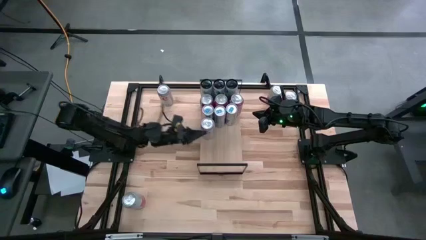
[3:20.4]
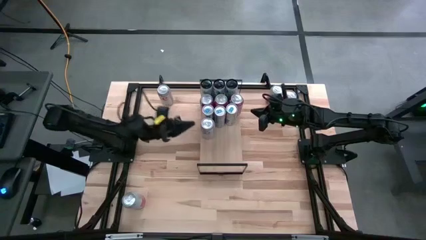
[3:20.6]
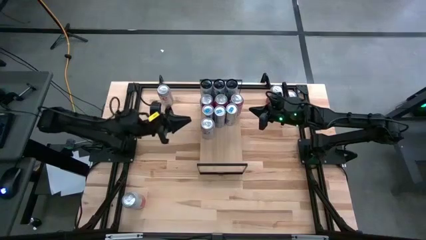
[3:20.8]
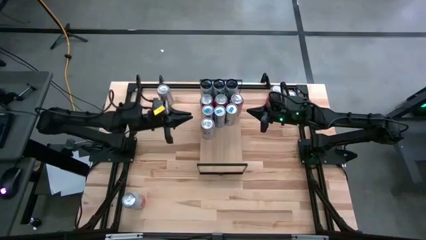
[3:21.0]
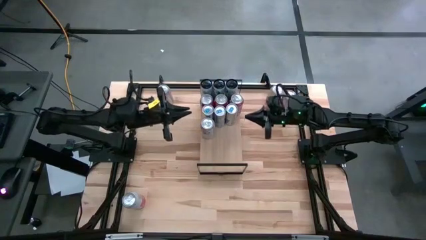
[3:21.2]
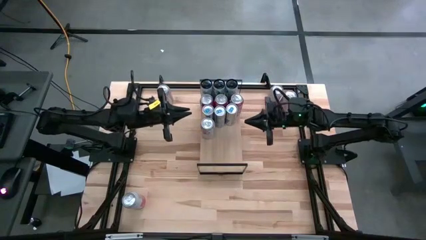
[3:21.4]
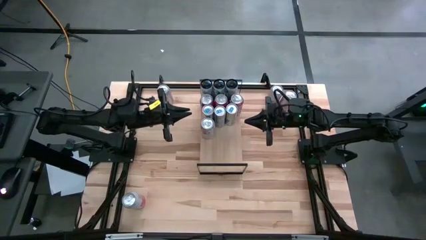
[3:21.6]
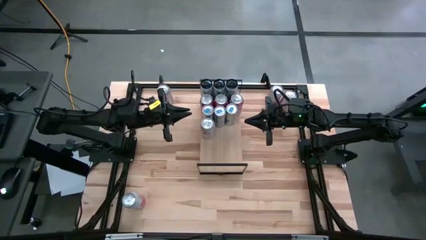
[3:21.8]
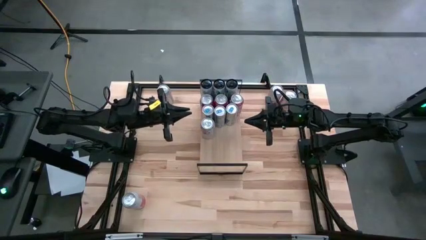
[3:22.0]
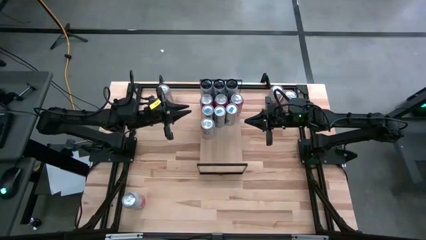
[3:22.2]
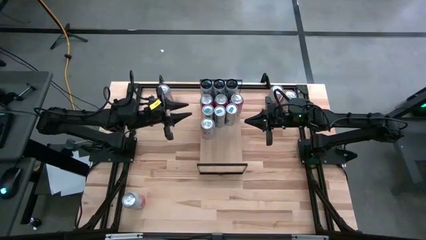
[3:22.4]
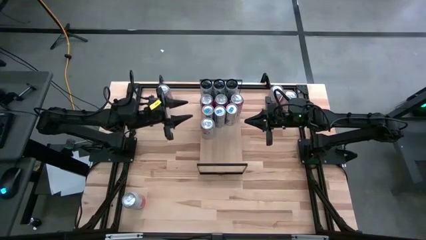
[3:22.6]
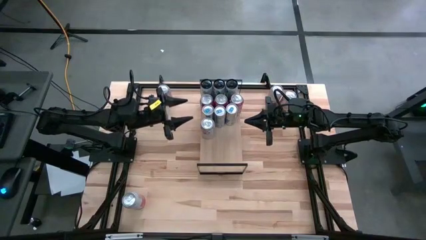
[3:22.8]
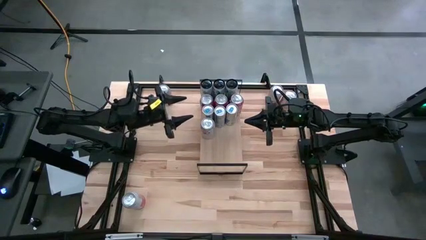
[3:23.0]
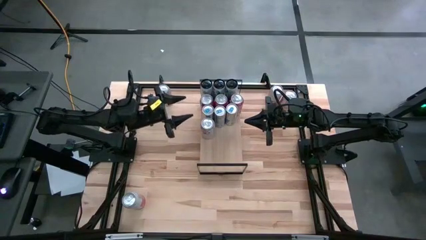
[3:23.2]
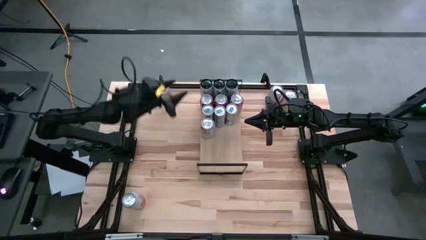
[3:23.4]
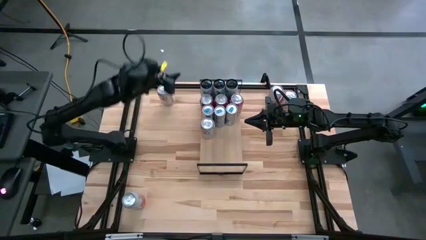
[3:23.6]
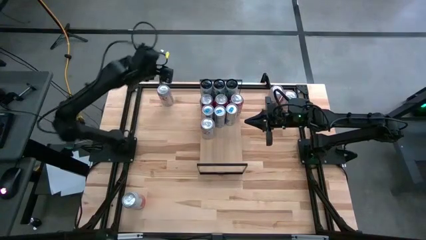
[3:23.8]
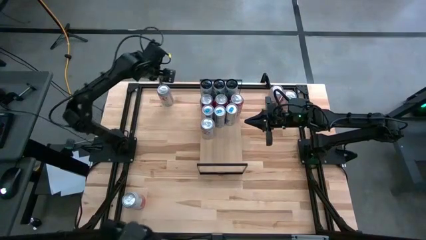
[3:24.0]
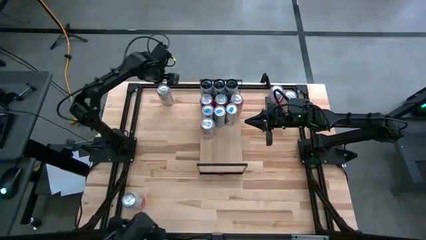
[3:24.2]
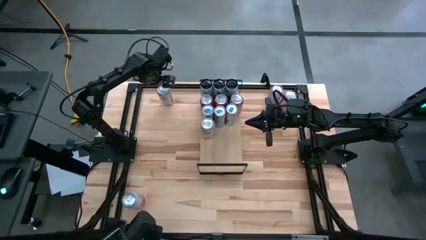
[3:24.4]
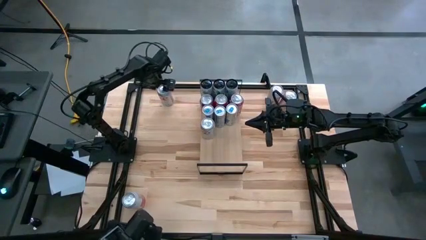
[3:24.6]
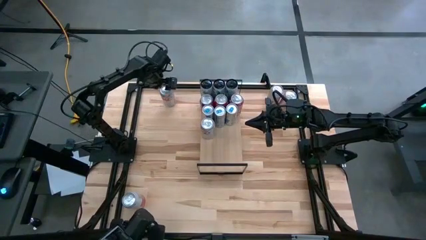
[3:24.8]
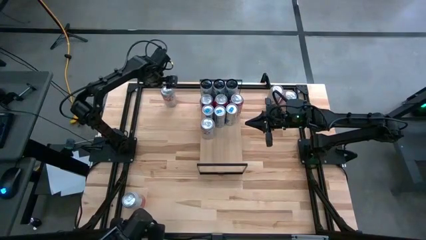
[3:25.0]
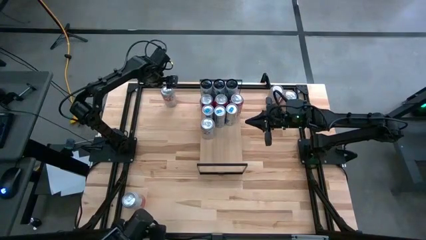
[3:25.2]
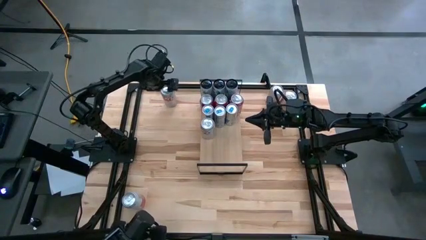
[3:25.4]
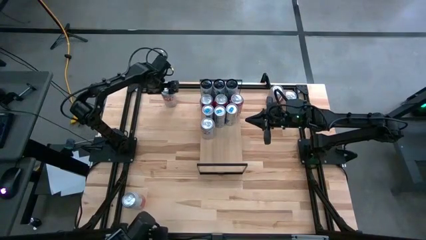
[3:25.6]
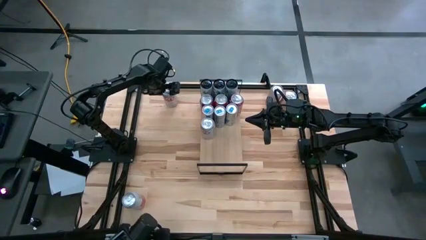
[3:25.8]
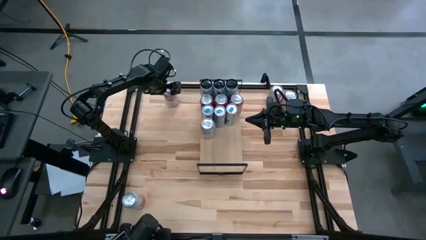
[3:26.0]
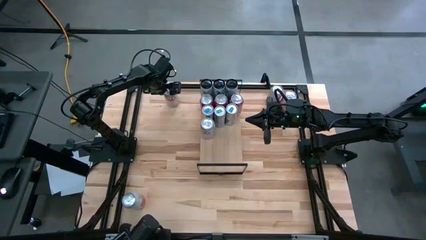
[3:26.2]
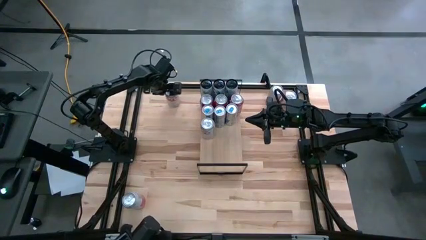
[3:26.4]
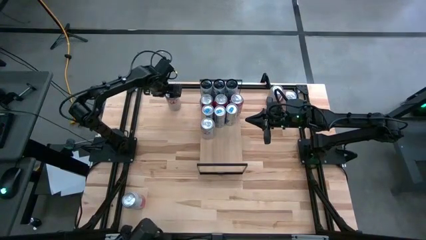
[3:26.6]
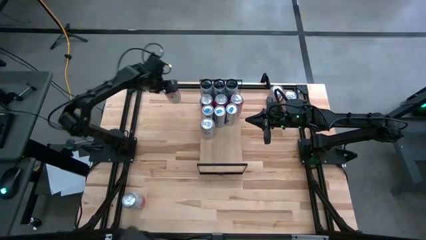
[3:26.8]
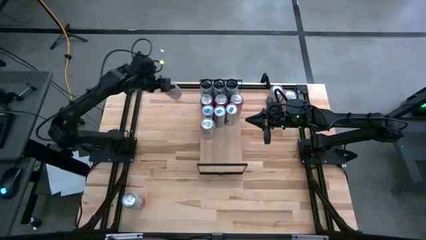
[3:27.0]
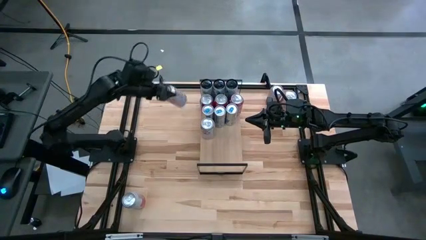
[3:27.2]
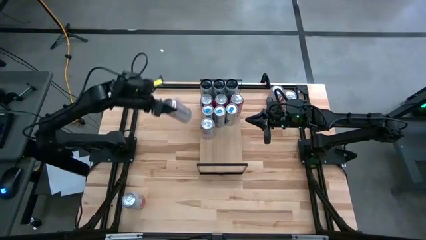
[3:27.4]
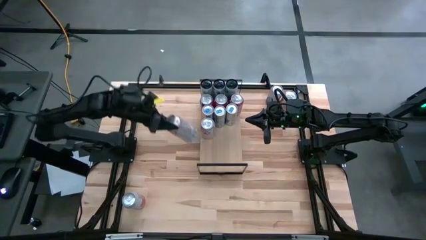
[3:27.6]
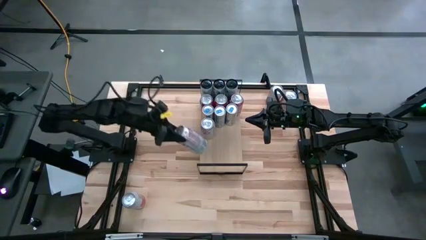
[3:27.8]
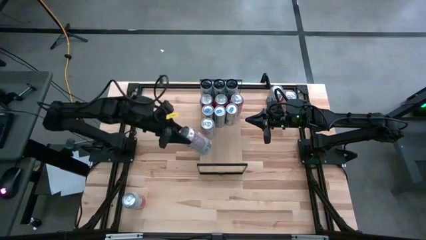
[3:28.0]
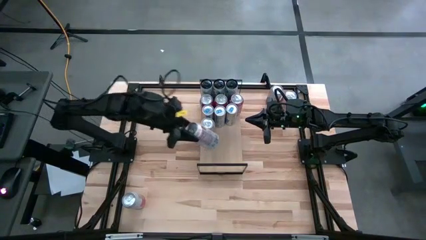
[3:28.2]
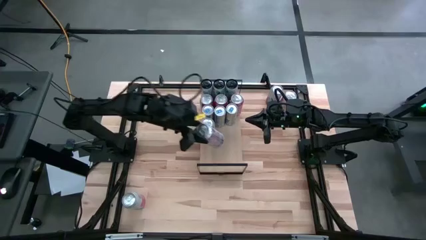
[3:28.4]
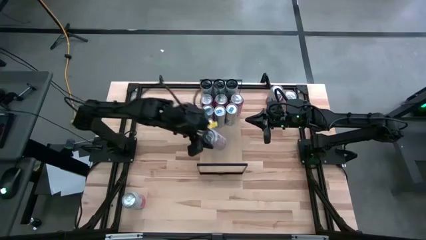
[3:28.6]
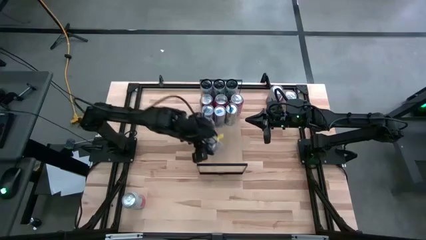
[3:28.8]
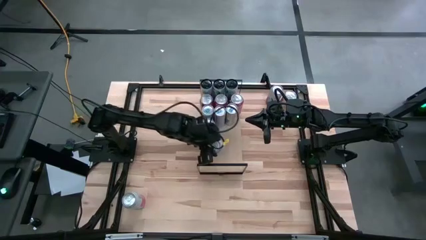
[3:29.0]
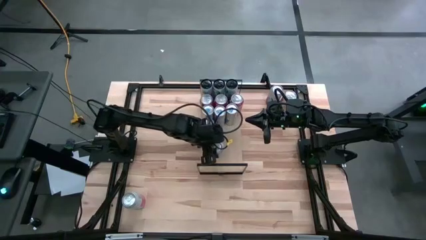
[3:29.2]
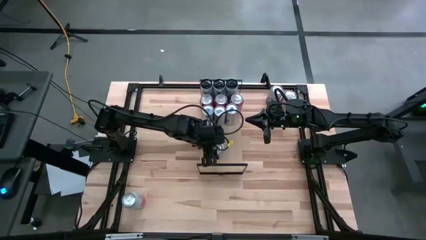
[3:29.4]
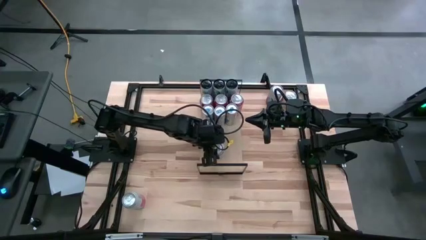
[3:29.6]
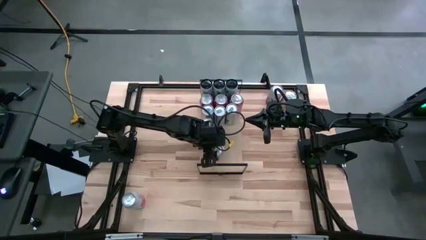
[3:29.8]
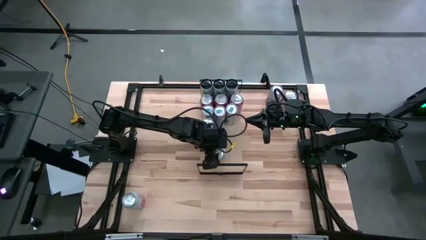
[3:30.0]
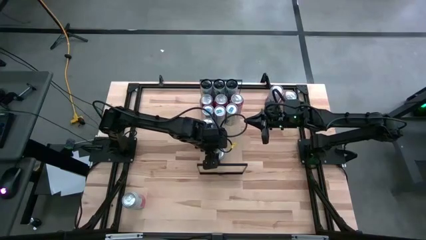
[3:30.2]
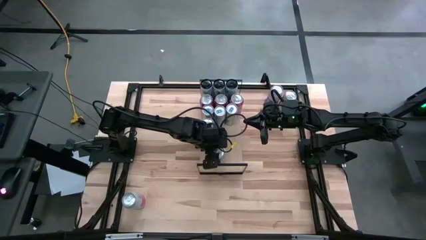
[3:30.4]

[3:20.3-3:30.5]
Task: Place canned beverage on shelf
Put the left red-silver soda can on the shelf aligned with the other red-silver soda can

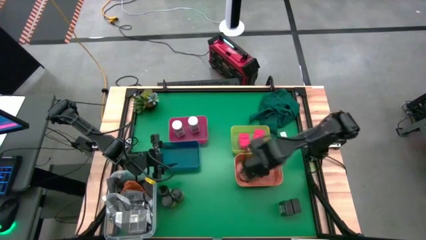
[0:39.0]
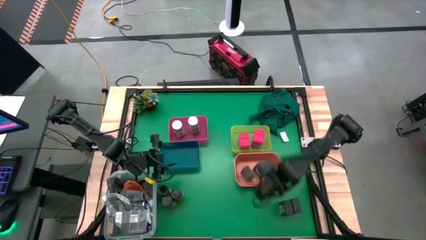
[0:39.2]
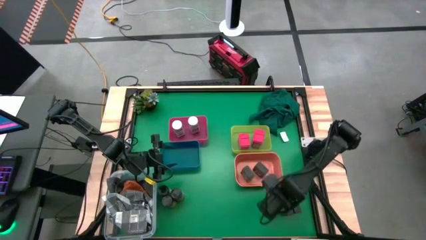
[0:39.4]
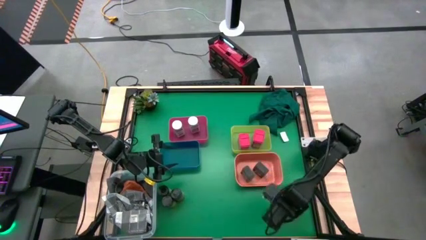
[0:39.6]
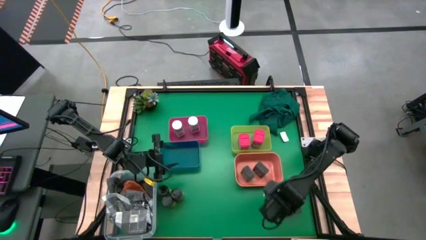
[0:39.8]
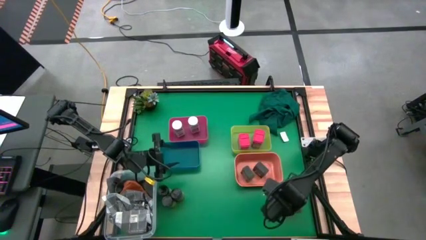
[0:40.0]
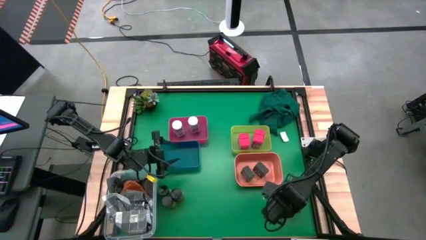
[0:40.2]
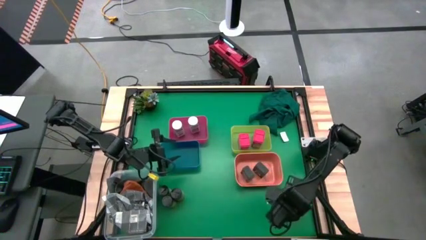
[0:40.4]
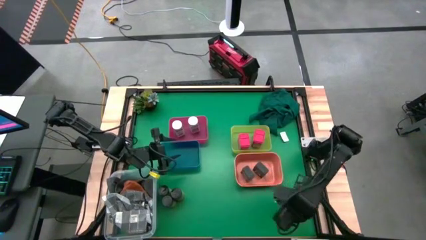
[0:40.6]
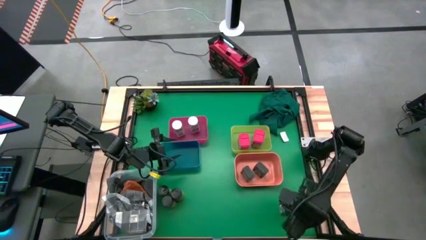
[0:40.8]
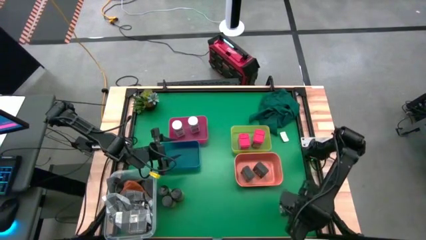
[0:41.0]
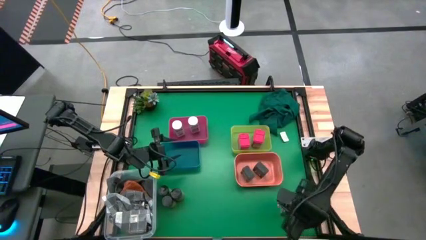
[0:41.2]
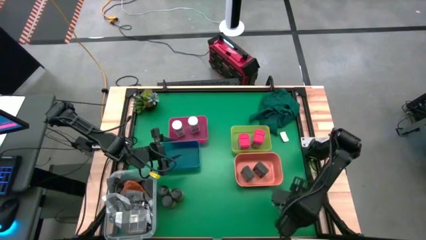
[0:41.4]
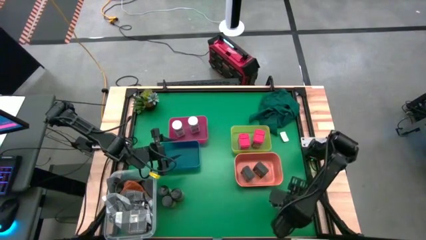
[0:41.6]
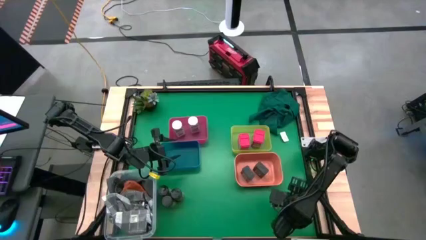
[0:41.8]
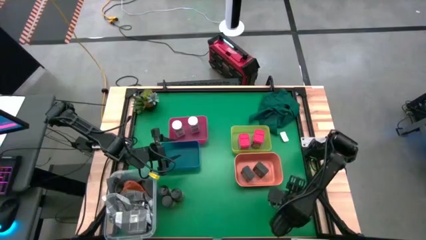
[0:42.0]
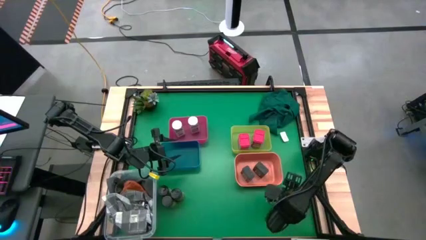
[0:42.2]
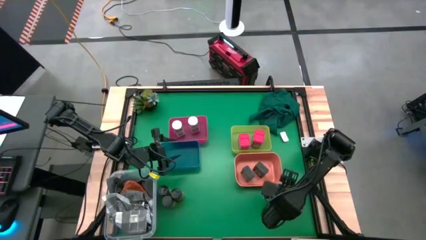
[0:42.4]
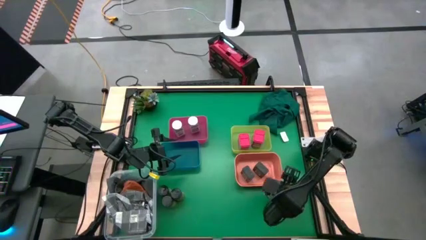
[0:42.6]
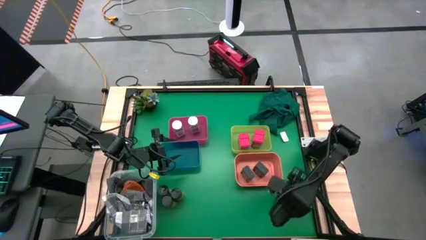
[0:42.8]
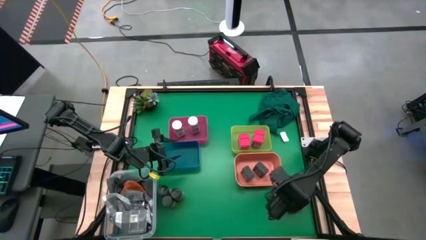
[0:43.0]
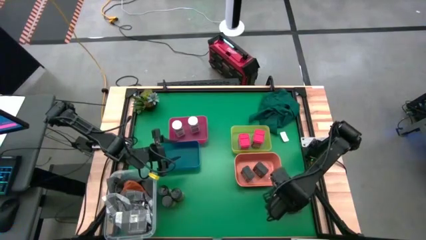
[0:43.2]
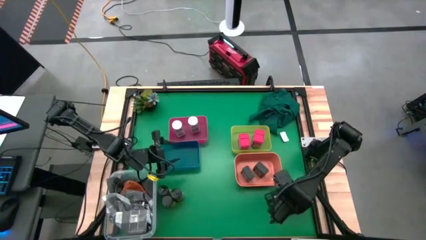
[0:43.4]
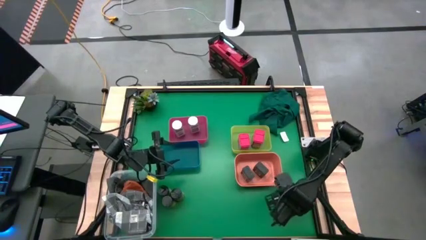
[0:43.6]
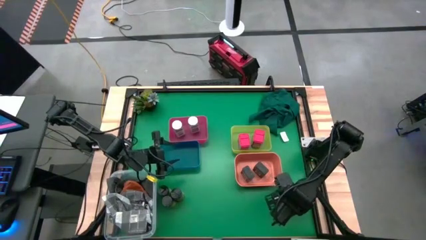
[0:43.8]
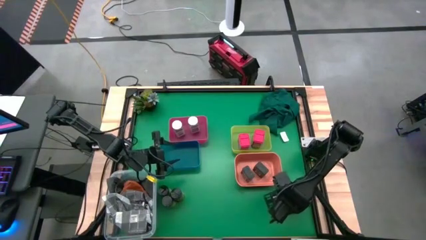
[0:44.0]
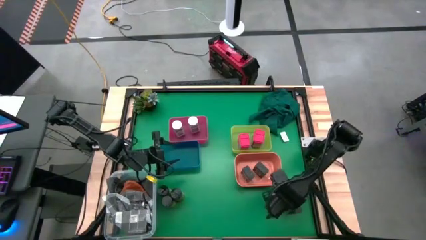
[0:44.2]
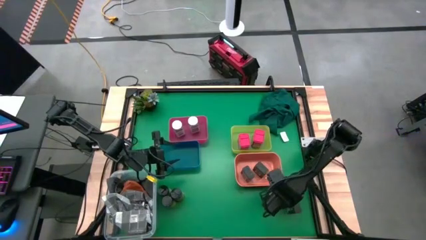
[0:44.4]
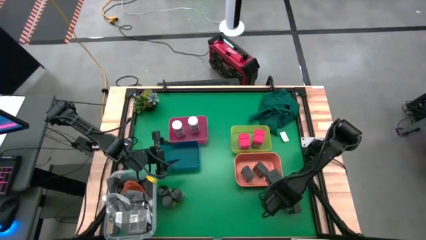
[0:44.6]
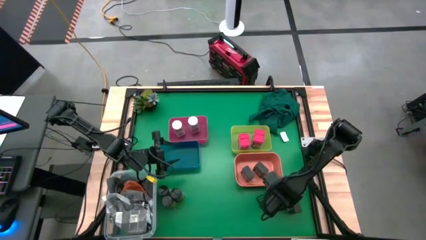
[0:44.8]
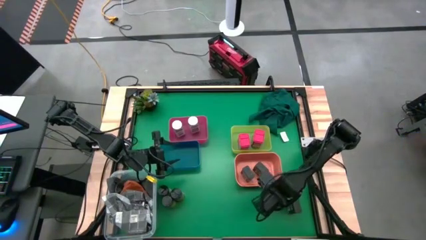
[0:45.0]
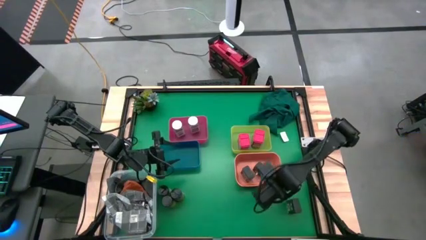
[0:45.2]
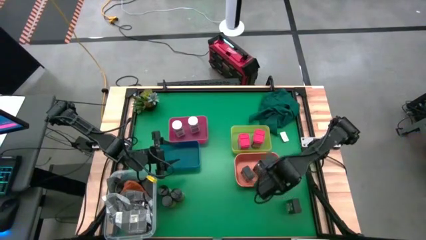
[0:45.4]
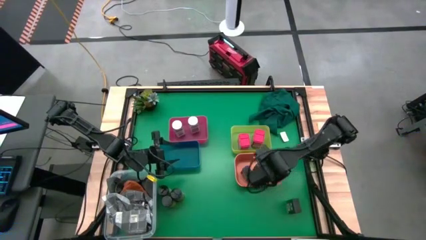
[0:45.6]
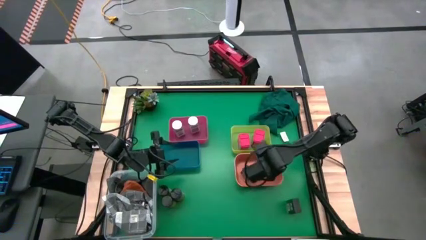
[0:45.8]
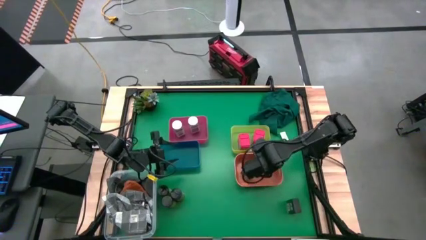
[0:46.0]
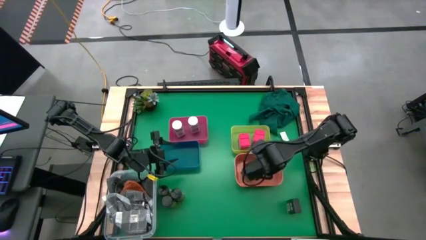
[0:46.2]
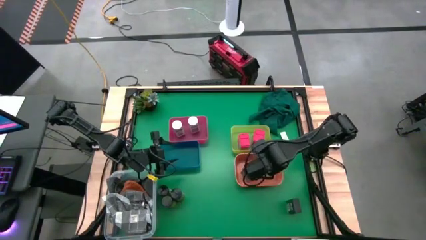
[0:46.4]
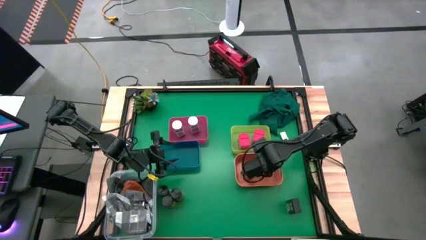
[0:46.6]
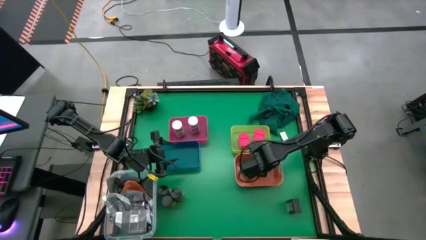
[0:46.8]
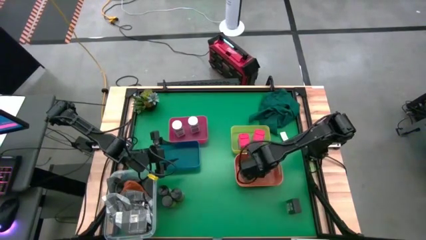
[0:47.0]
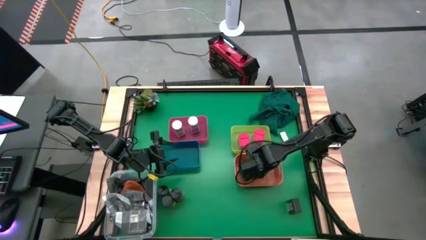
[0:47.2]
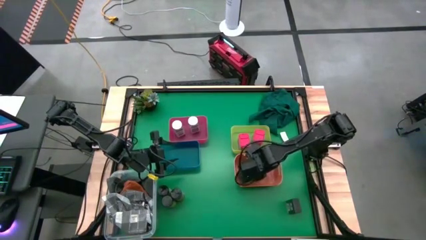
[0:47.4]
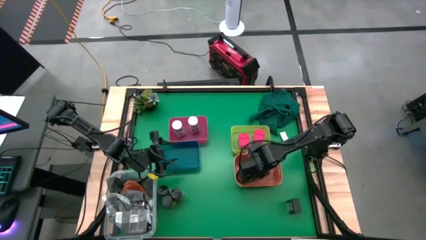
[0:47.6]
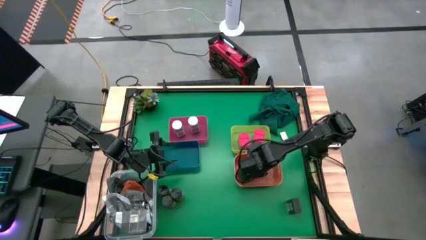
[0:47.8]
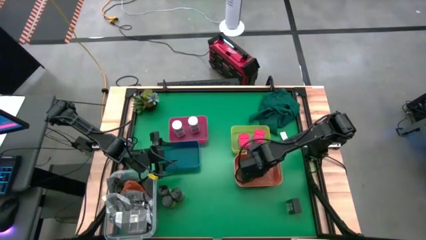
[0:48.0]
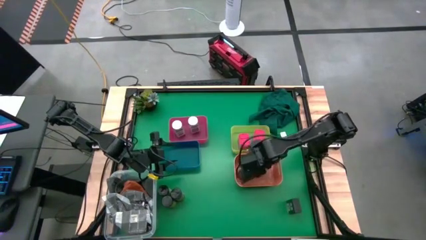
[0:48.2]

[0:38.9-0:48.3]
Task: Sort spices by type
Put the left black seasoning can into the orange bin
